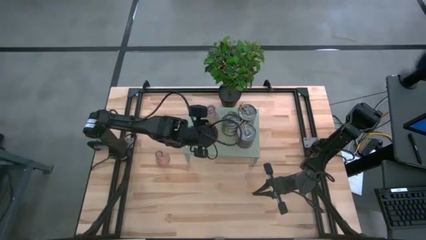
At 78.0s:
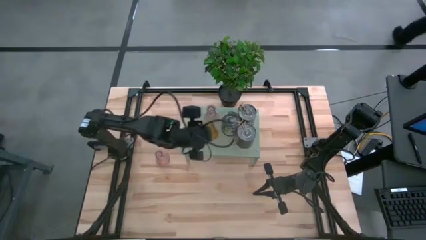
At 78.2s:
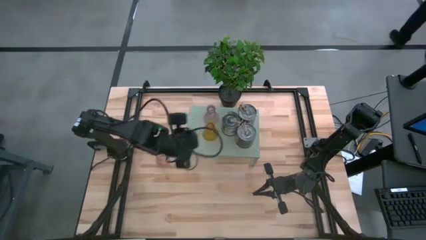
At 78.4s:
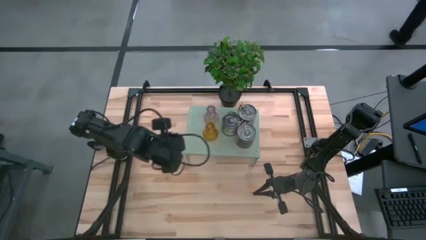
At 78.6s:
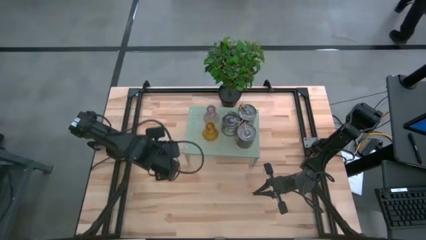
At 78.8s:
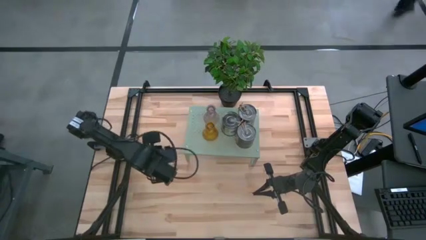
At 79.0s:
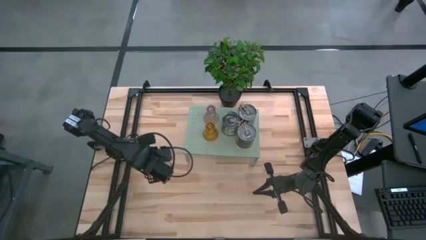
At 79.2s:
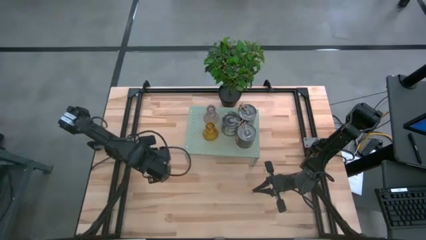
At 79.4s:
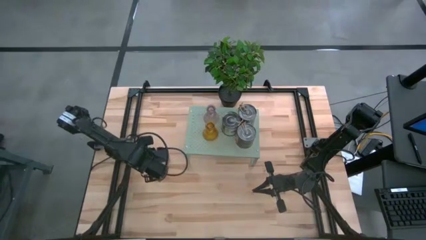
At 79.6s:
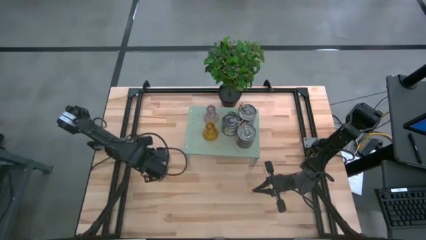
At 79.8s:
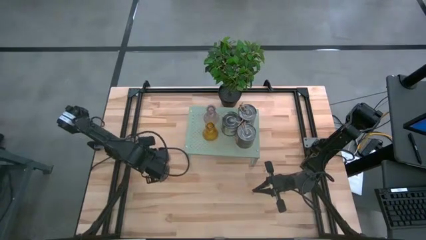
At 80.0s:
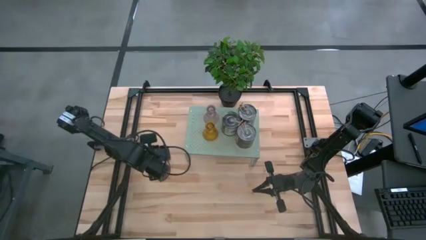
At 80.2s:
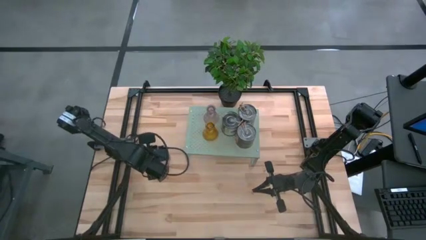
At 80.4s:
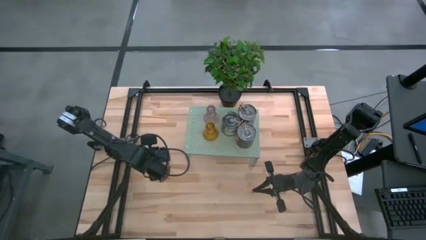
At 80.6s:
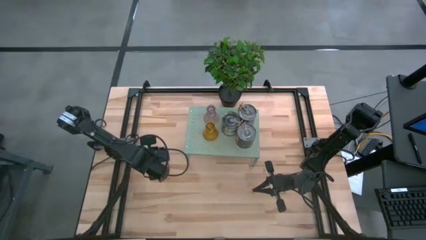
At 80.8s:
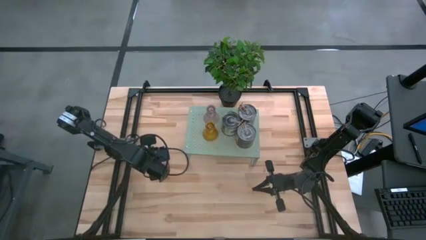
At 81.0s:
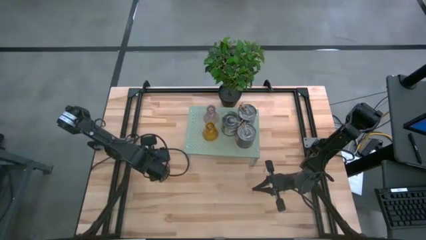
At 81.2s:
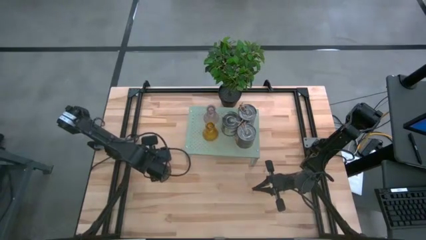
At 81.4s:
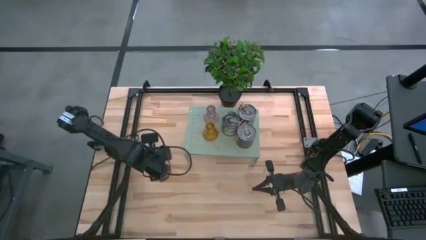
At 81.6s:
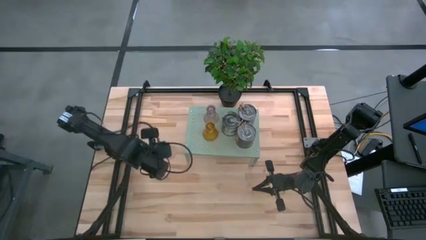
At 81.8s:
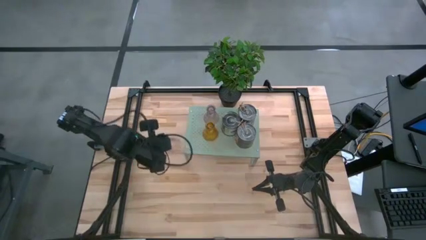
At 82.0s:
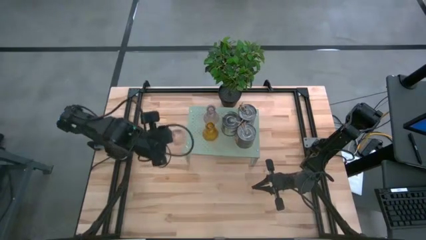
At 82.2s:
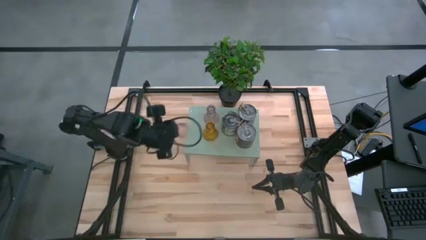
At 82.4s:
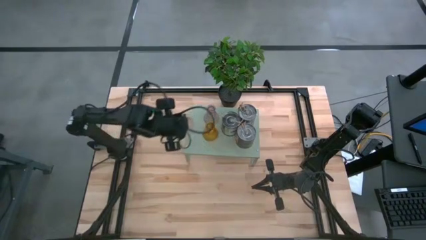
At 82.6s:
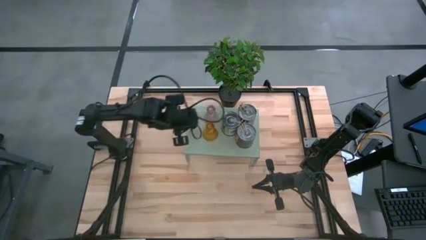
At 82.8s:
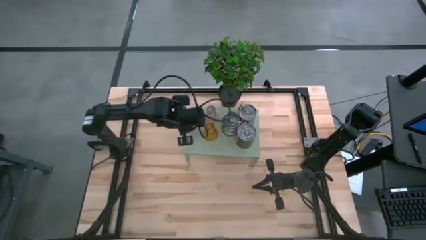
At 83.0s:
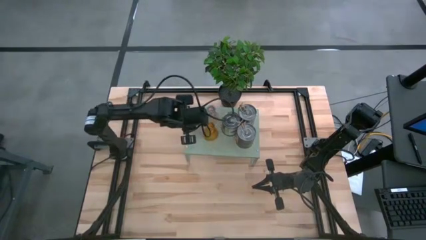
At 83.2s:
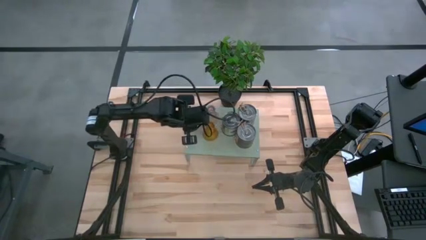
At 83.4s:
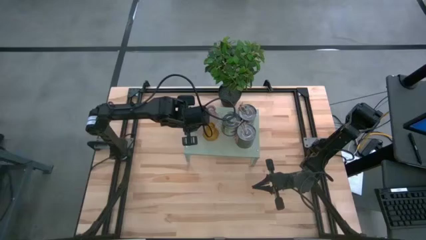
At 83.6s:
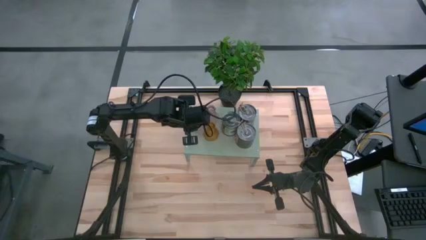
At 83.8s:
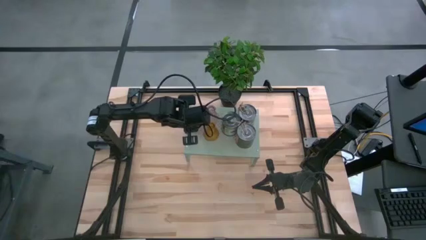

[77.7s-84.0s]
Task: Pick & Place candle stick holders
Put the purple candle holder on the shelf

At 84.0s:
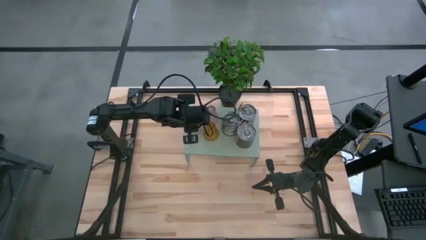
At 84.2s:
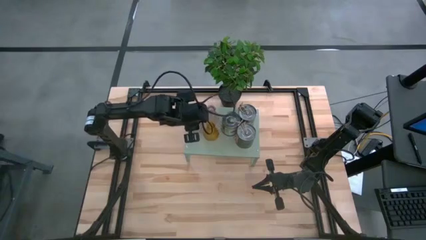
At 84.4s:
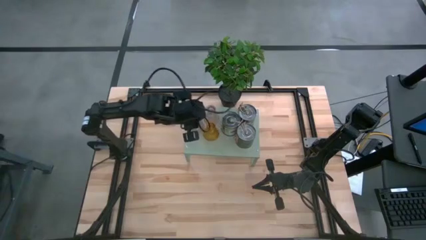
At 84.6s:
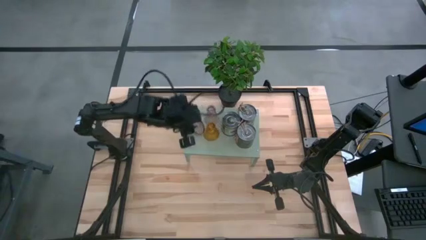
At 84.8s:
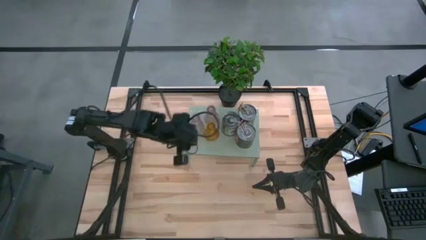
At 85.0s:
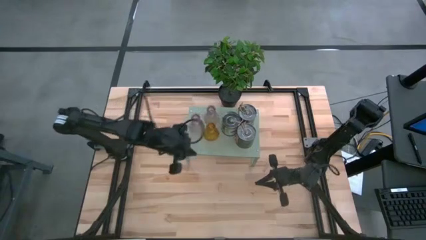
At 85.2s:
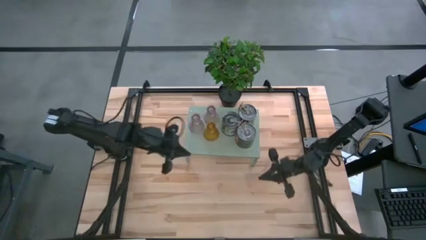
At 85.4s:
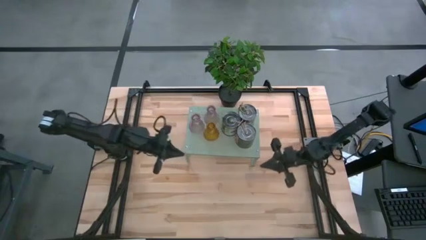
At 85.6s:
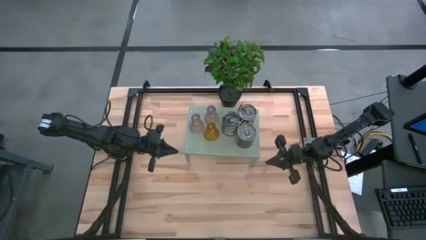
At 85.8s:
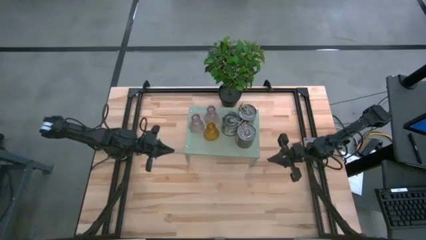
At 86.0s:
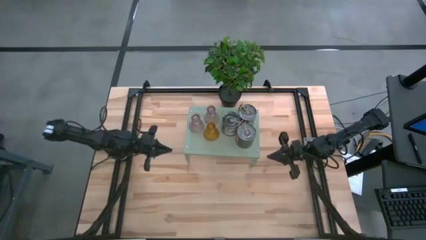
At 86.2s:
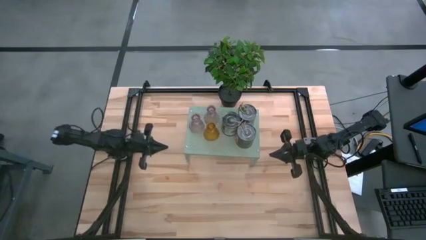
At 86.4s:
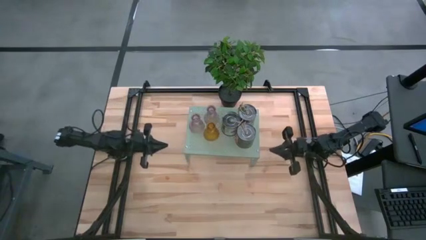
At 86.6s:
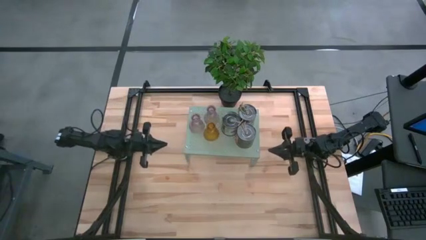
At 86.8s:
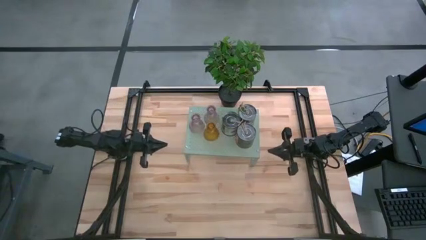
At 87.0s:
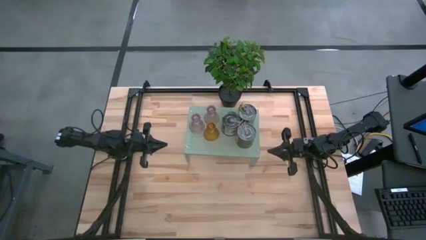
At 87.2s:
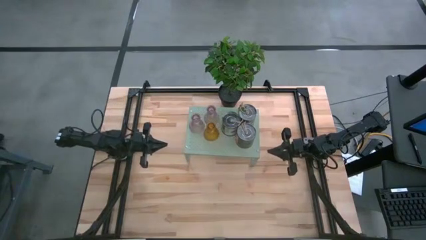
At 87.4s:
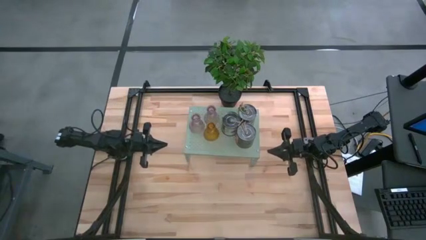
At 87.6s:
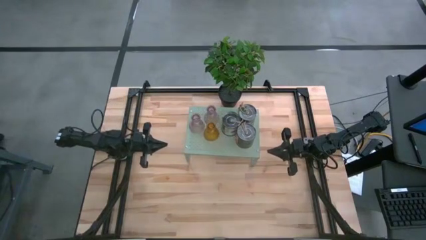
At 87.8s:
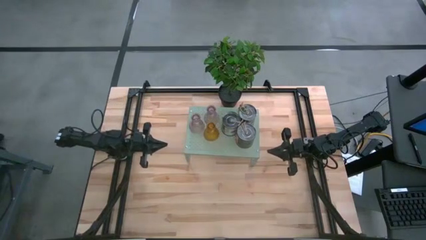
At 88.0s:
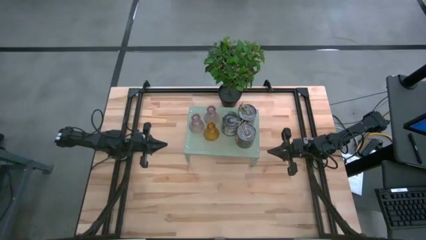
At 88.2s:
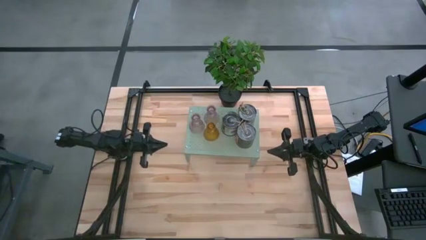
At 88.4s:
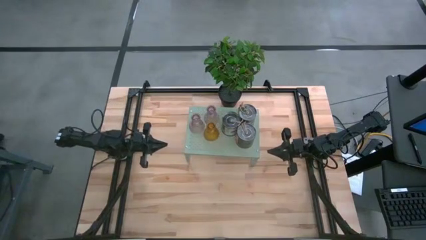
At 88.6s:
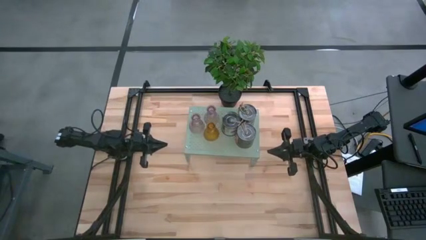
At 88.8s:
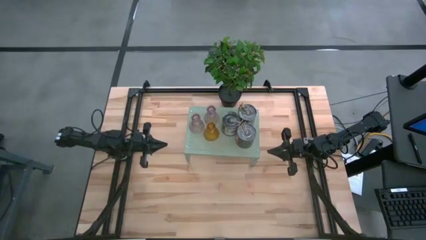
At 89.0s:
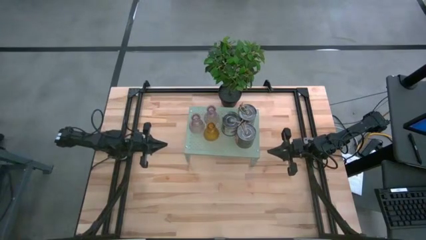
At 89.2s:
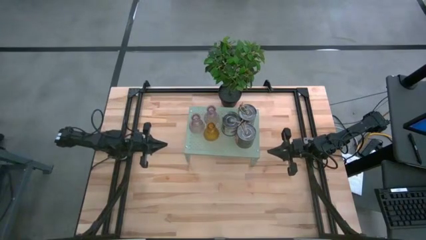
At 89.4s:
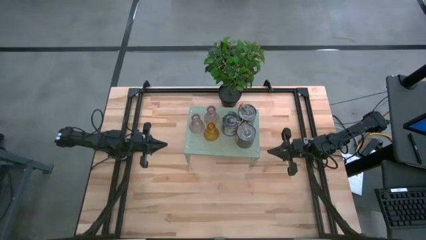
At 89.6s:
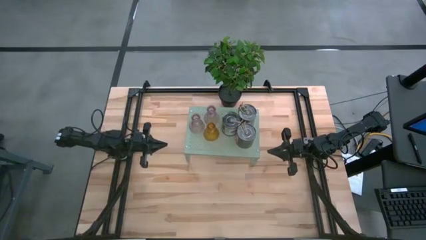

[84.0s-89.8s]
Return to Home Position

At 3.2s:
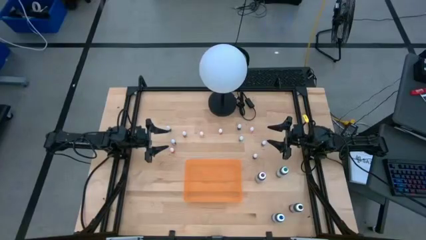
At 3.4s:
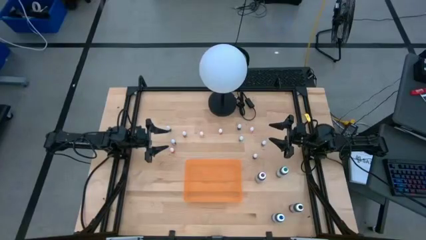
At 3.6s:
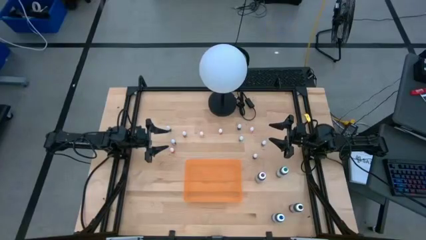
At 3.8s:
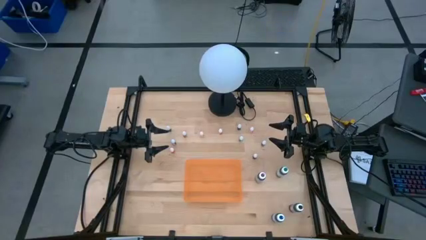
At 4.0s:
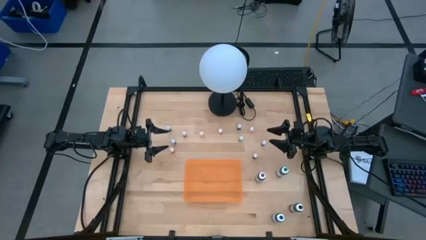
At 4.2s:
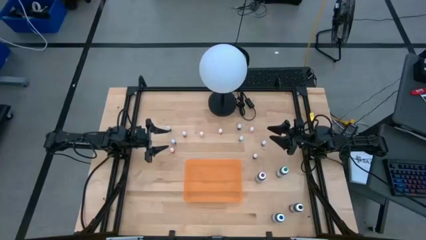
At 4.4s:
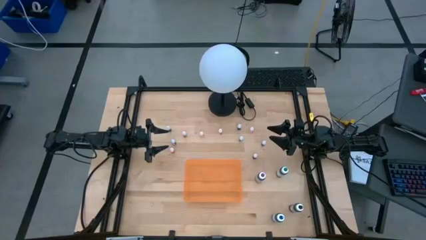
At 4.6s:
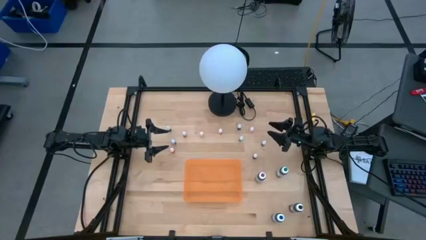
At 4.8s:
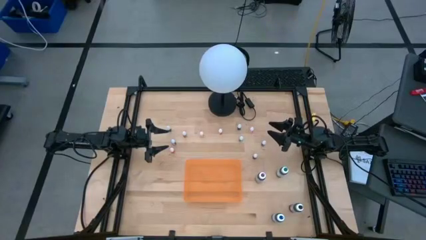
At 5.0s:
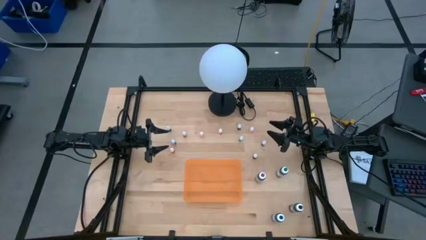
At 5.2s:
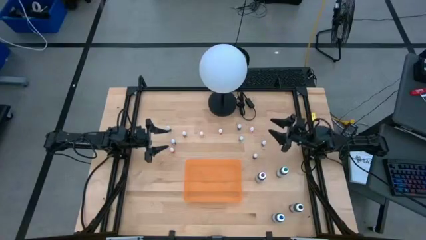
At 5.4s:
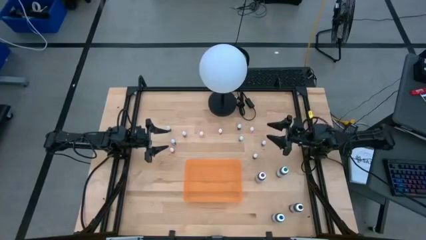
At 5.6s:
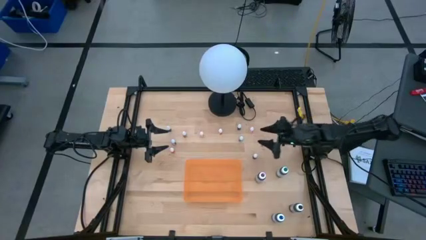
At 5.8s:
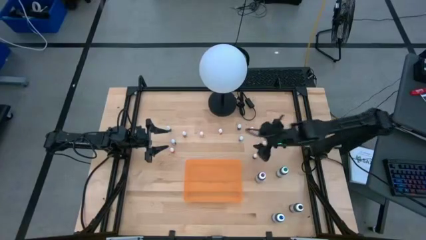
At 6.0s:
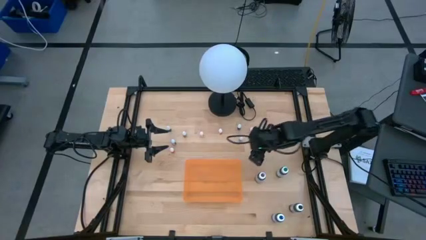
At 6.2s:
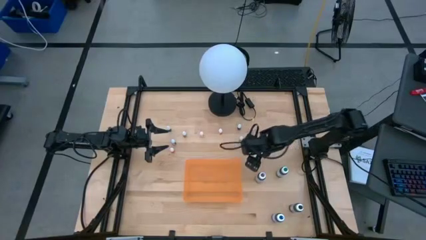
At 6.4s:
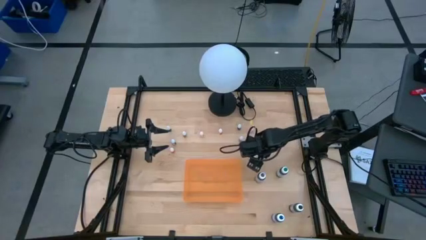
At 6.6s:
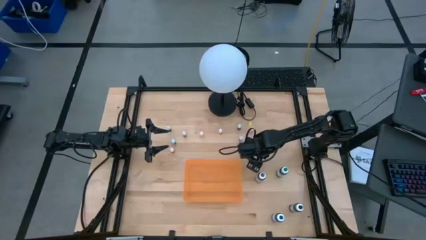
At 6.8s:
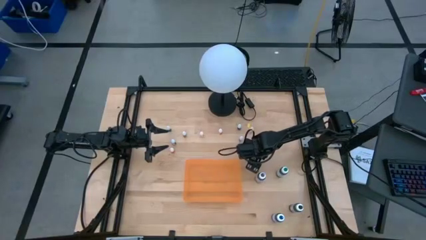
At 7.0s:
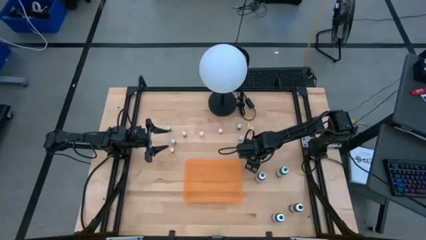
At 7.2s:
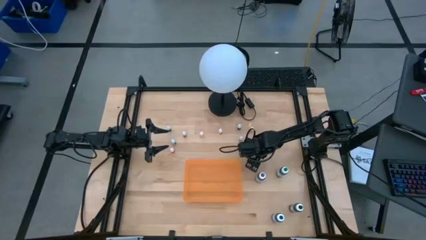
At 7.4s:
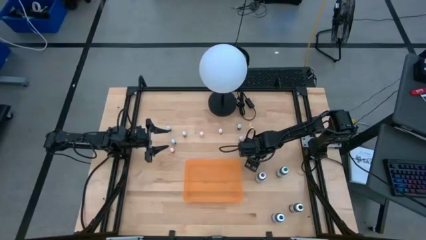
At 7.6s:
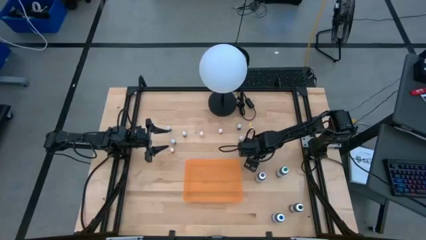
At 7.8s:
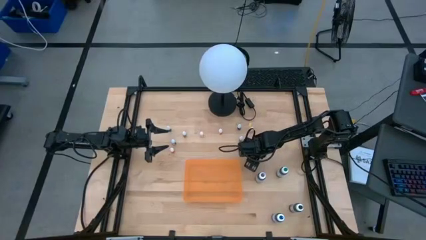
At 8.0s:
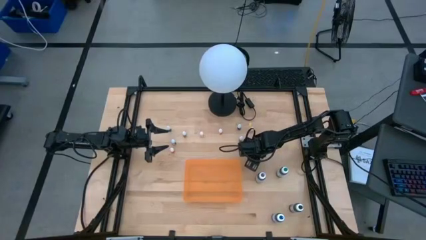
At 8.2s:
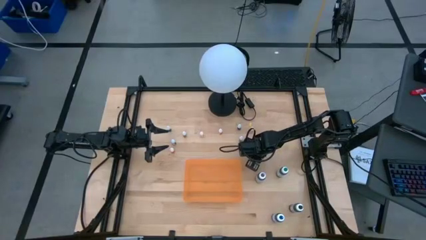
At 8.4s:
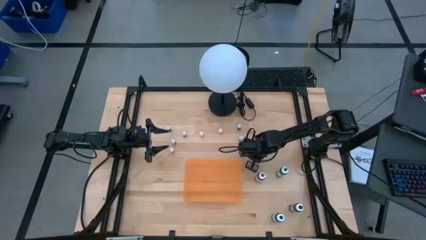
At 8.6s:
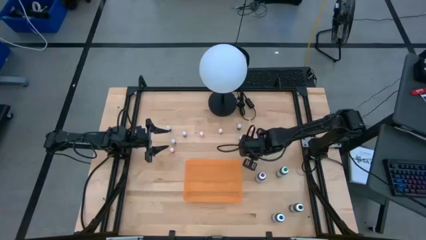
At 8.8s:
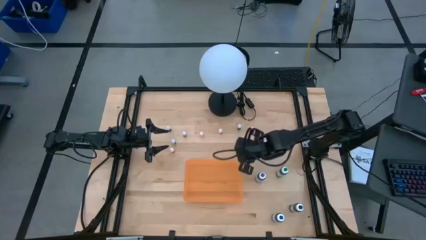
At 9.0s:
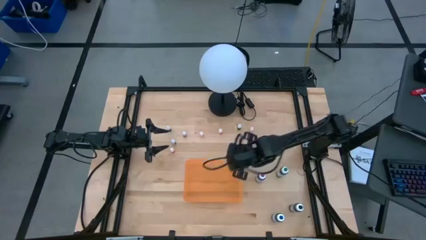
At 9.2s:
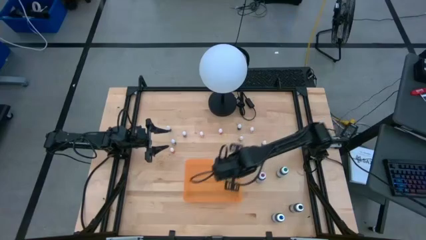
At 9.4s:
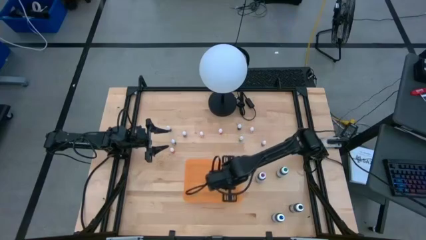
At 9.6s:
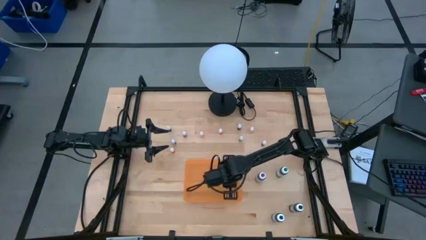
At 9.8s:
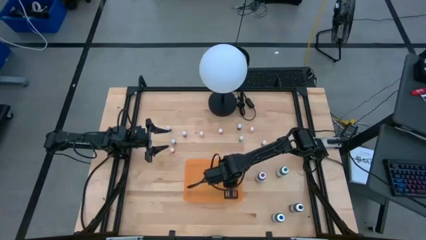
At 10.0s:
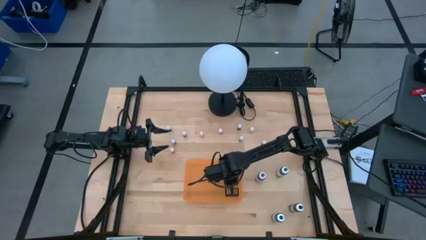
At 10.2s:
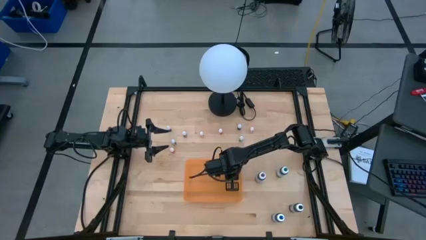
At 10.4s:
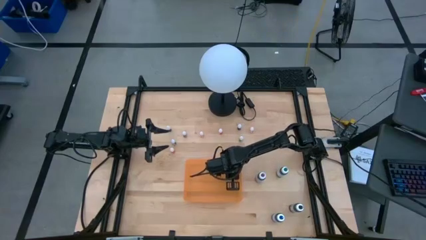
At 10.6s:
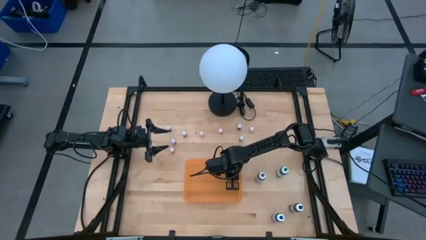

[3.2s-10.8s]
Task: Pick & Place food coloring
Put the small black food coloring bottle into the orange container
